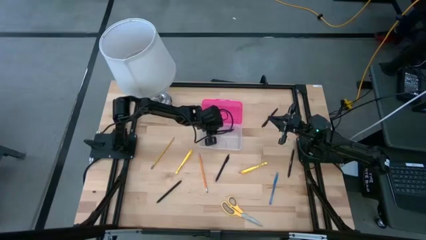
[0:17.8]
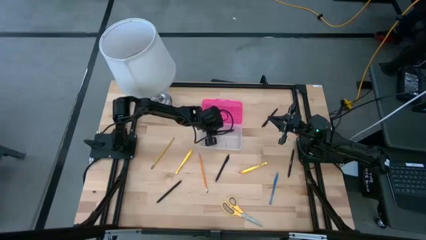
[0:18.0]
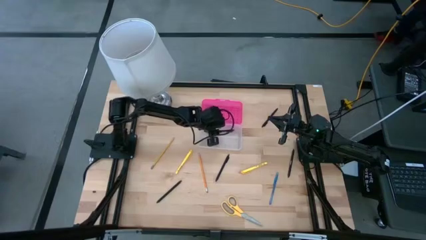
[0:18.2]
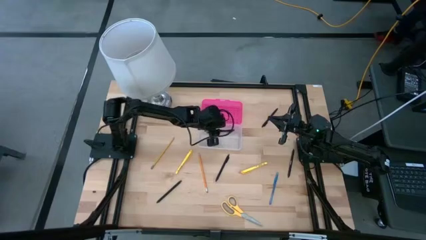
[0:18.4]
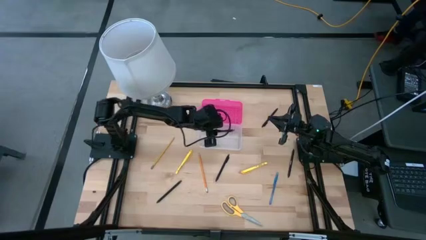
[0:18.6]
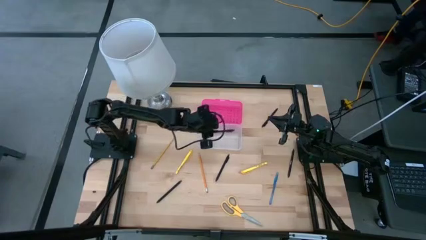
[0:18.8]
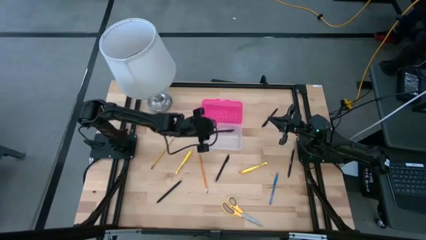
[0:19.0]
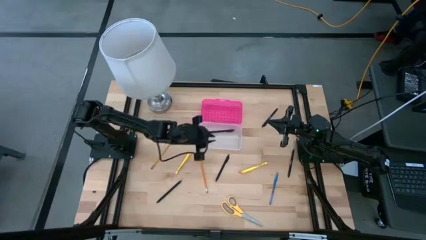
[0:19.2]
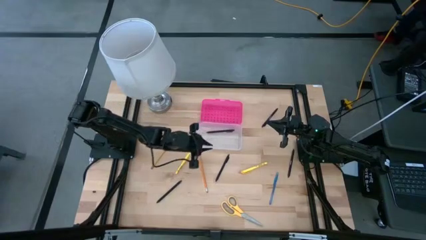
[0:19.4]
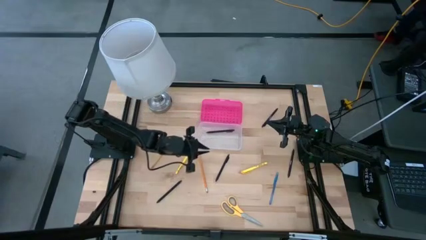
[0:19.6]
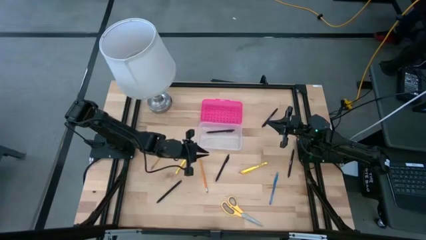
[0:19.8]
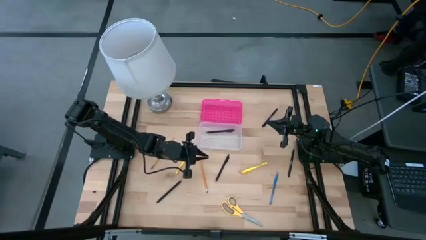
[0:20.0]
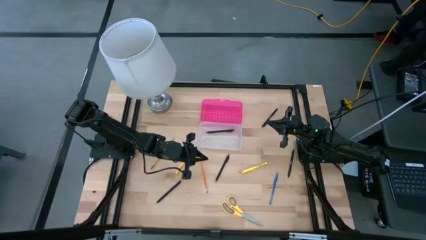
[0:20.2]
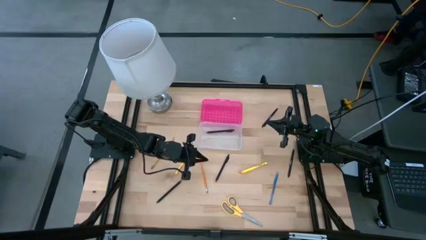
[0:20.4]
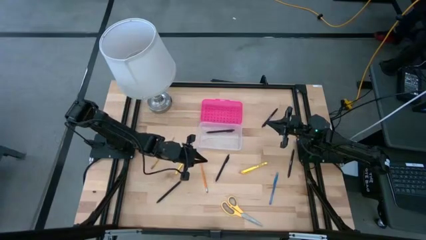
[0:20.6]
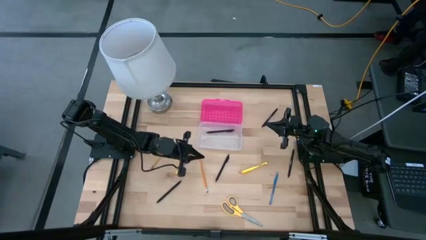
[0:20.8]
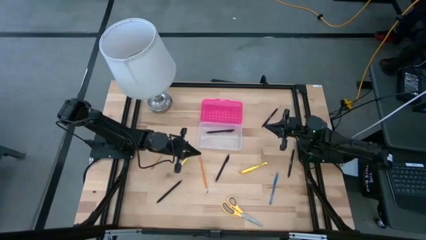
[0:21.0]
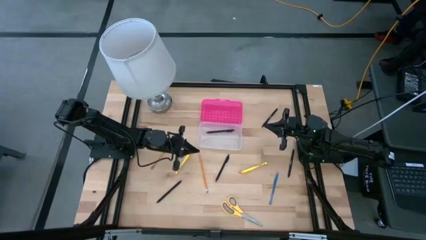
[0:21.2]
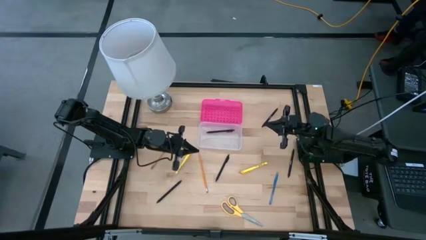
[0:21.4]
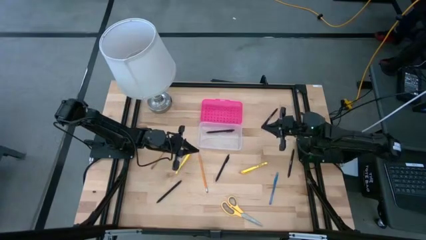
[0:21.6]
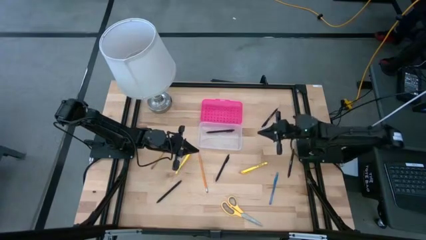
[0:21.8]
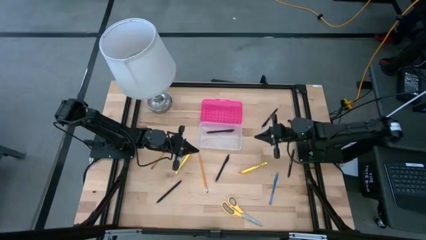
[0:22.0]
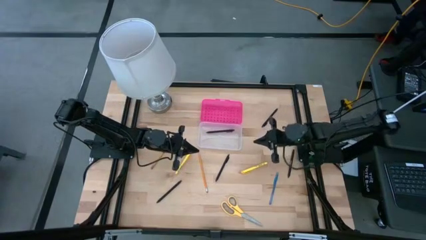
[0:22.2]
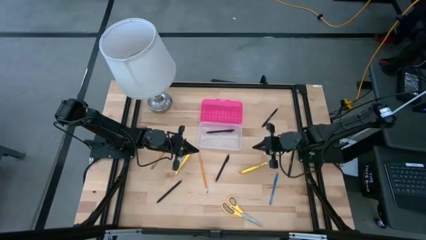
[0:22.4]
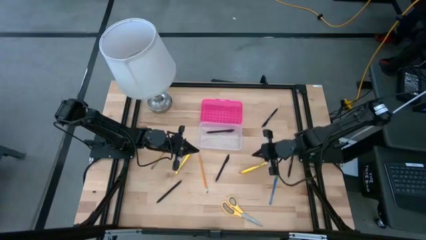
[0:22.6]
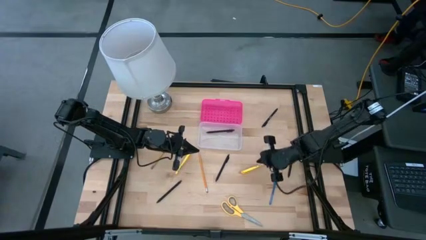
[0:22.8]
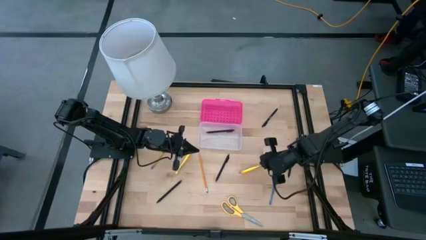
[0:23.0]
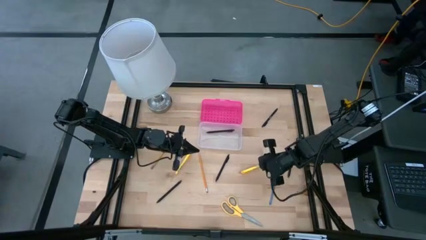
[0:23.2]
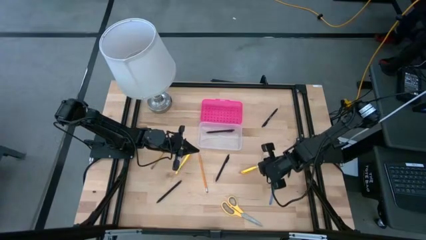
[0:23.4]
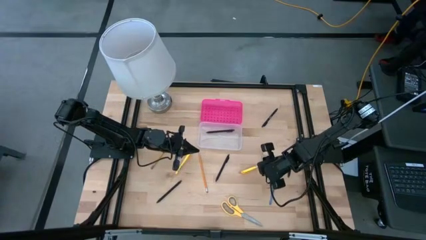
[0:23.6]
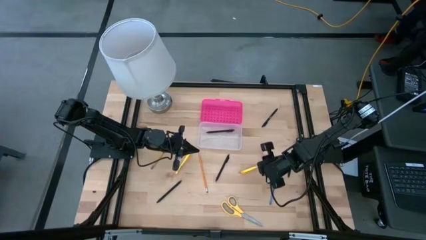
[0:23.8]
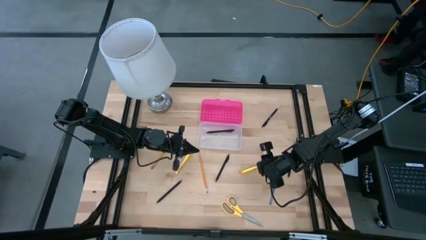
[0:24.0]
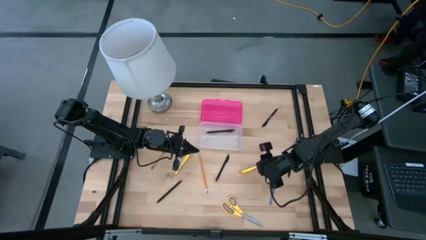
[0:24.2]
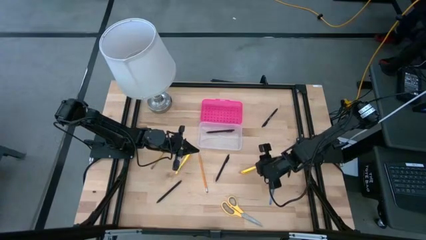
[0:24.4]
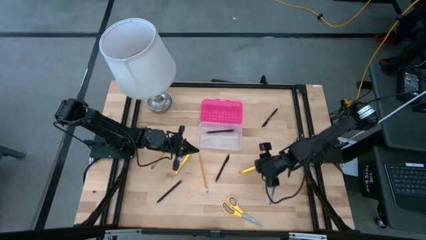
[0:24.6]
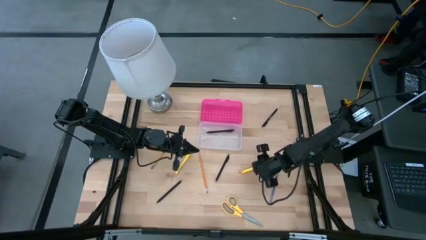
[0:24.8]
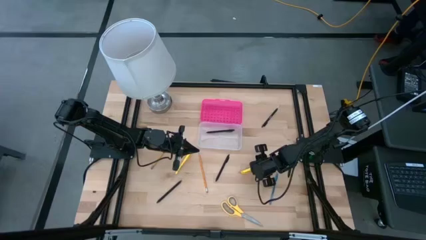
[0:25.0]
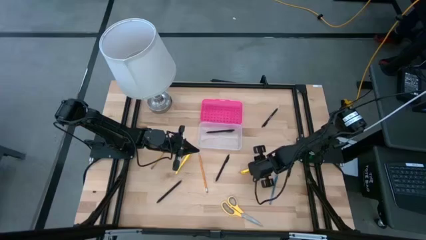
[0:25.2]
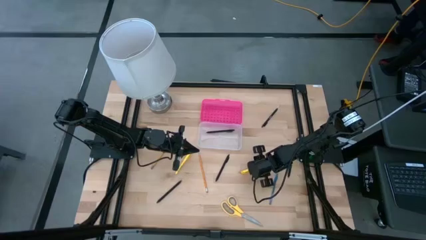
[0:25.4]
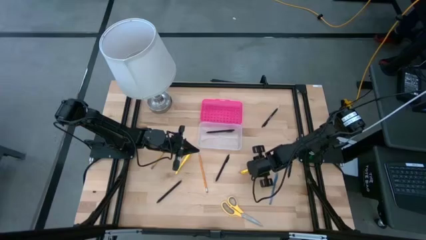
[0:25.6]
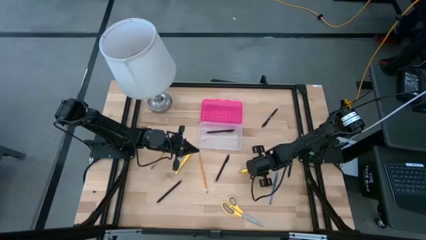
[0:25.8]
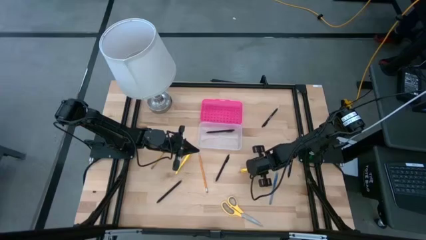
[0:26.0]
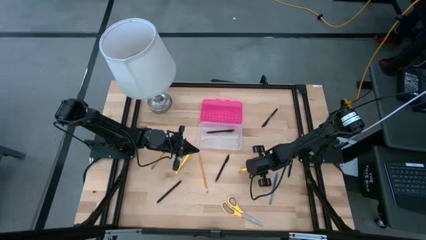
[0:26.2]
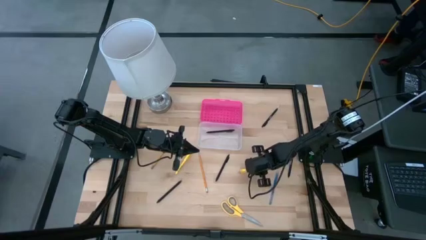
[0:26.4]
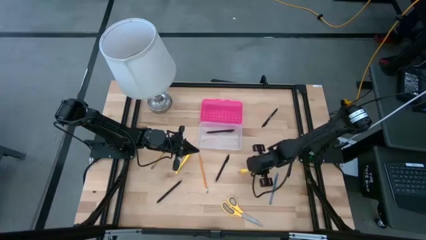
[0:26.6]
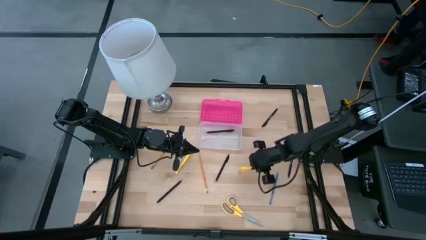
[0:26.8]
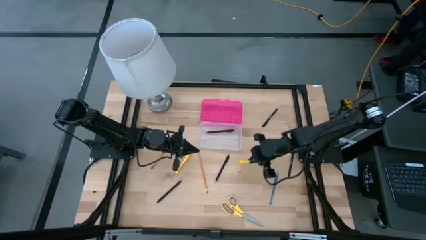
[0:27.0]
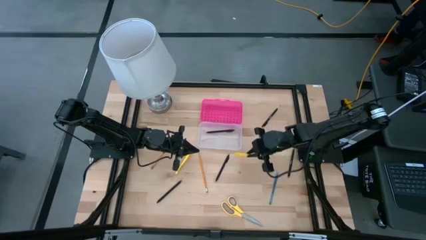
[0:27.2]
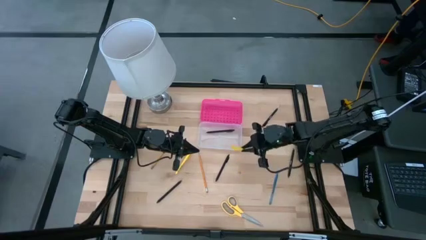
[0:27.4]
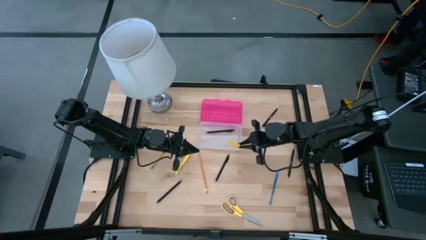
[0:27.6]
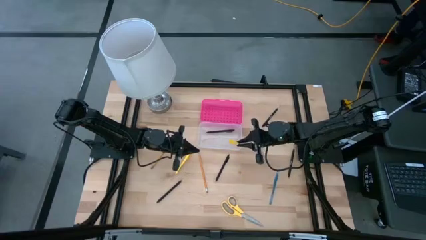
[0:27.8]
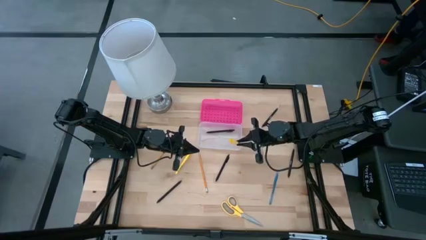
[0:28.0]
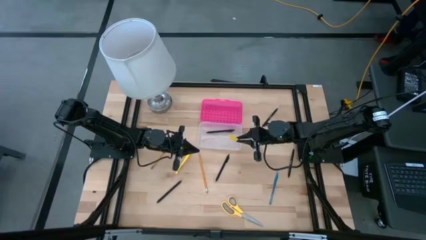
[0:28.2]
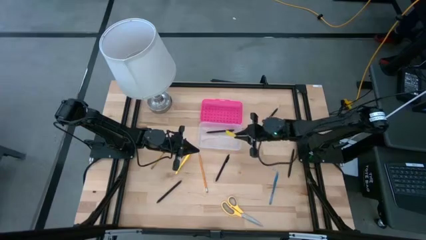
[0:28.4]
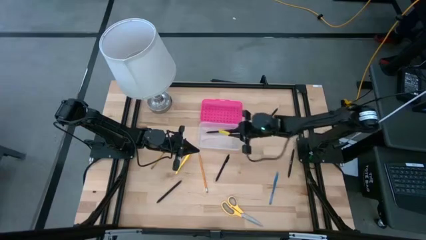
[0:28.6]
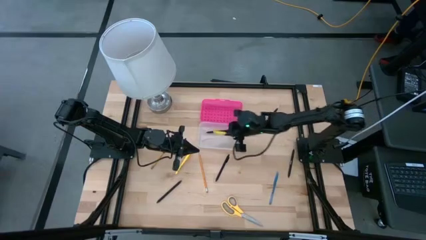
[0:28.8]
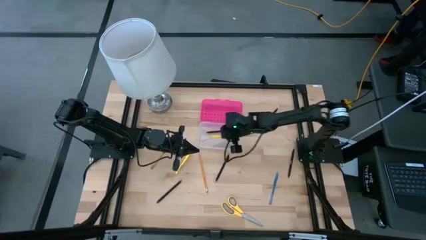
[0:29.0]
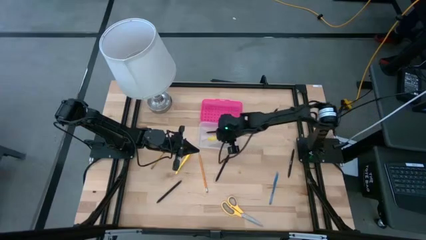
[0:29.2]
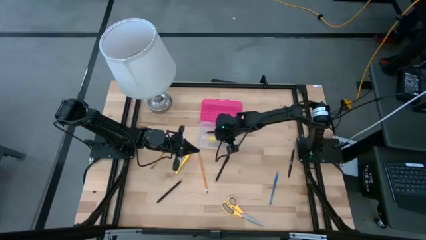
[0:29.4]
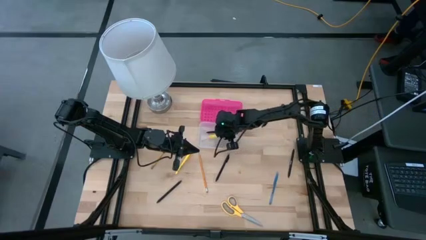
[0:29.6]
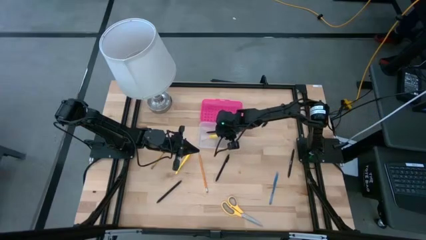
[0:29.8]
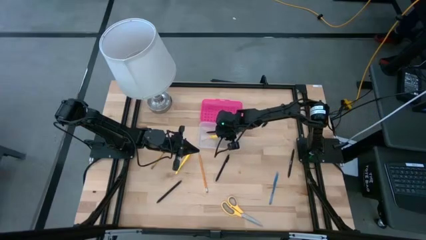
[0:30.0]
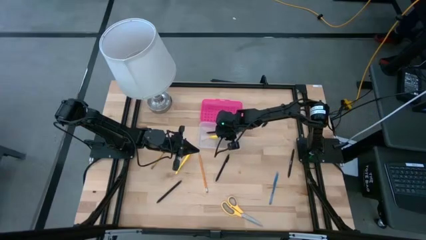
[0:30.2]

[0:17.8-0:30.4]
Task: Pick & place school supplies into a supply box
Put the yellow pen into the pink supply box
